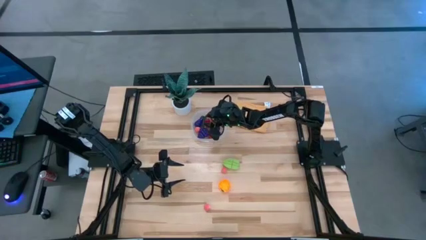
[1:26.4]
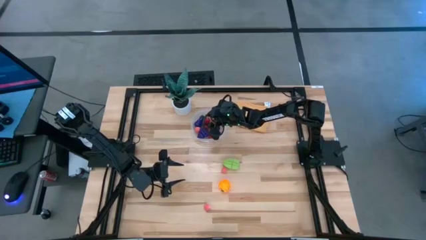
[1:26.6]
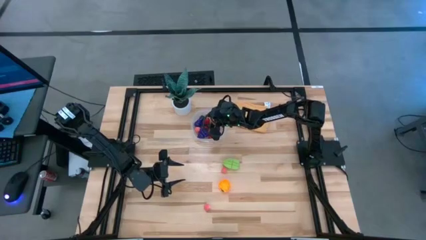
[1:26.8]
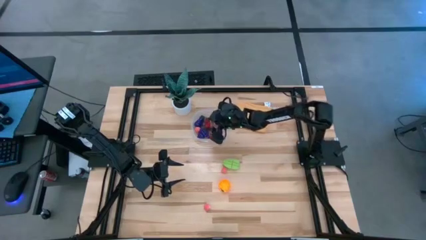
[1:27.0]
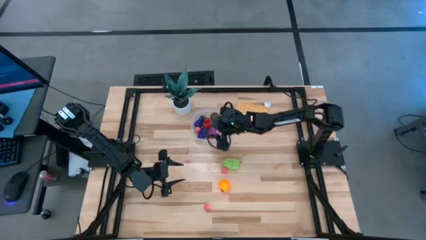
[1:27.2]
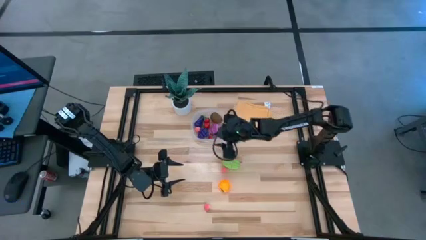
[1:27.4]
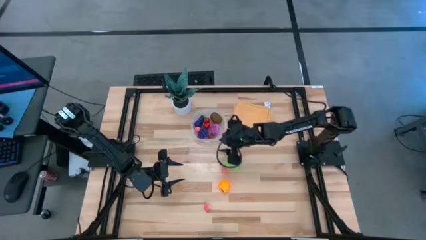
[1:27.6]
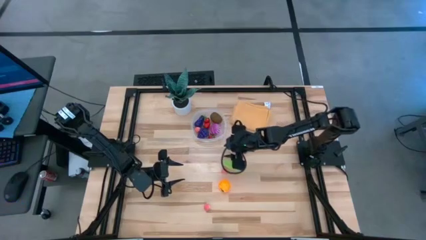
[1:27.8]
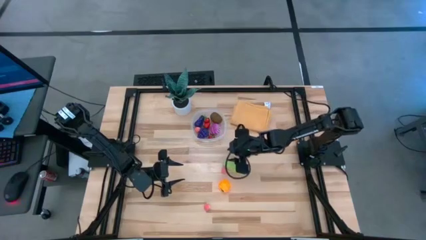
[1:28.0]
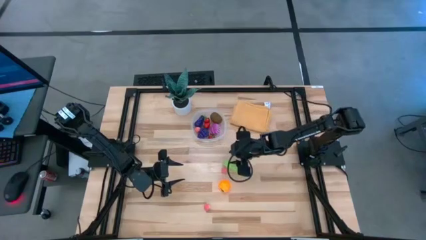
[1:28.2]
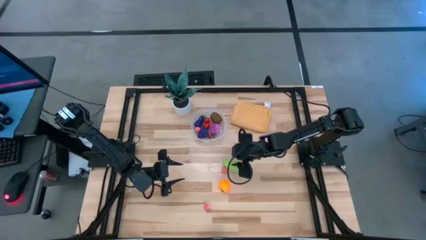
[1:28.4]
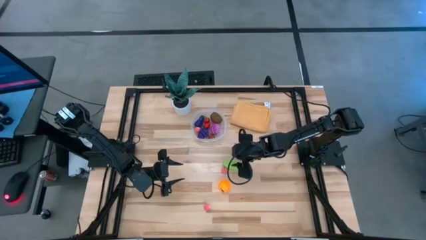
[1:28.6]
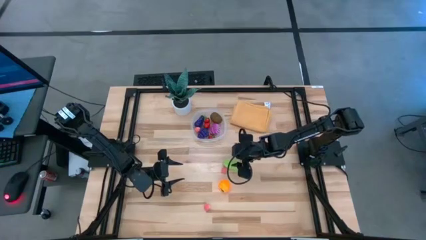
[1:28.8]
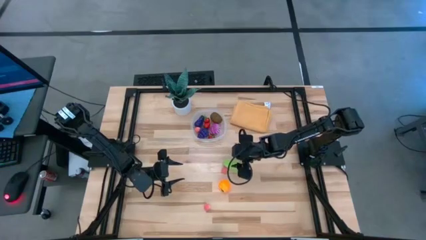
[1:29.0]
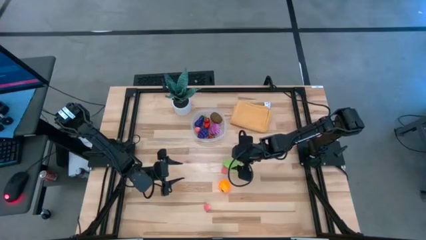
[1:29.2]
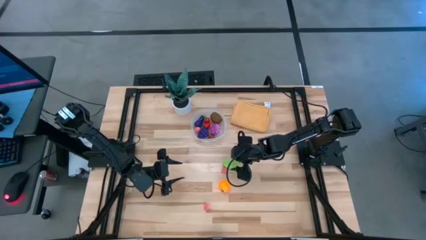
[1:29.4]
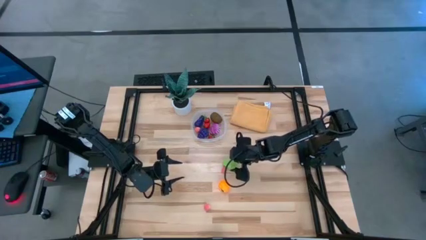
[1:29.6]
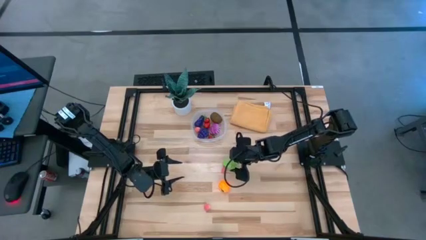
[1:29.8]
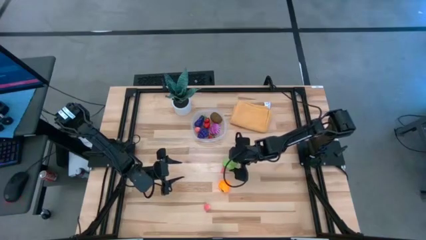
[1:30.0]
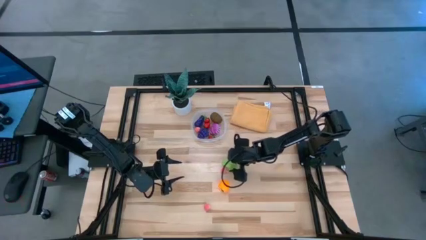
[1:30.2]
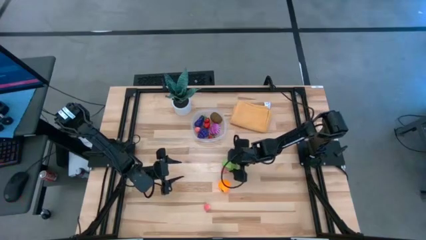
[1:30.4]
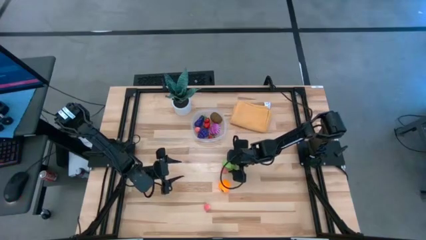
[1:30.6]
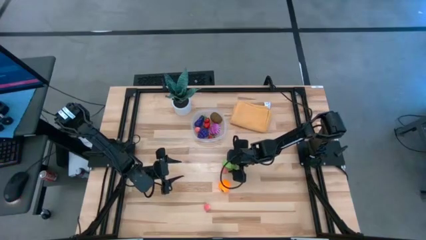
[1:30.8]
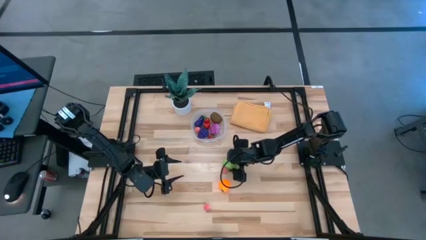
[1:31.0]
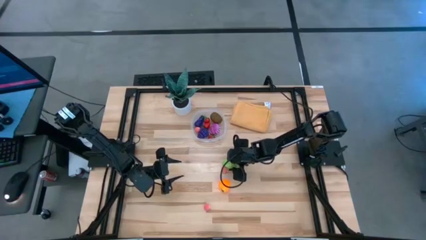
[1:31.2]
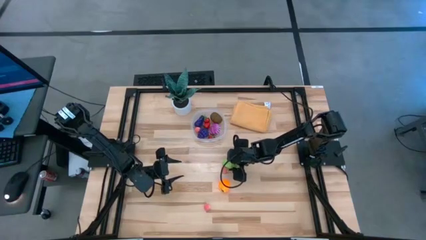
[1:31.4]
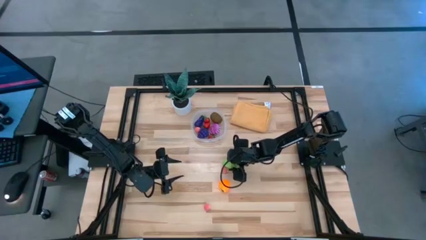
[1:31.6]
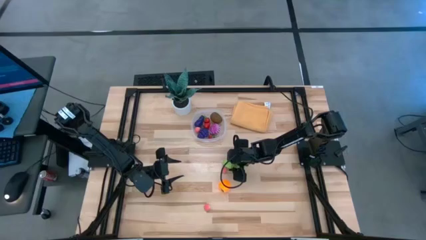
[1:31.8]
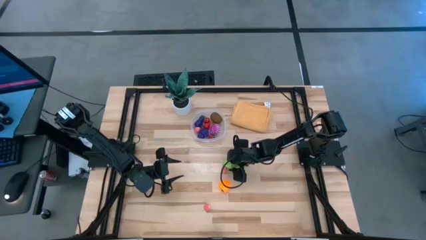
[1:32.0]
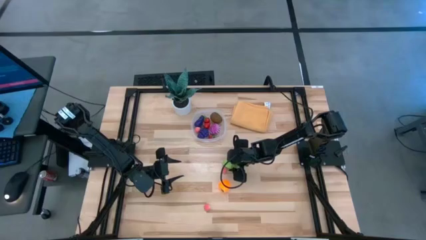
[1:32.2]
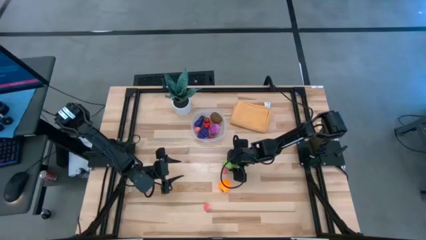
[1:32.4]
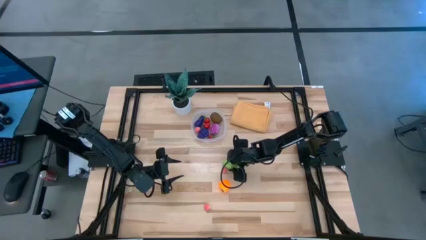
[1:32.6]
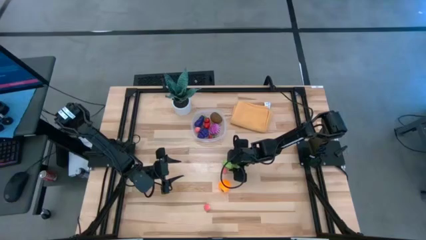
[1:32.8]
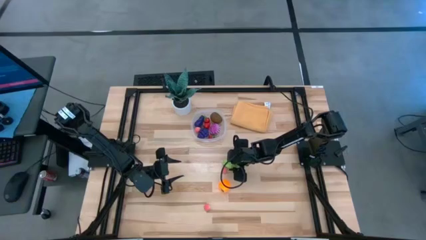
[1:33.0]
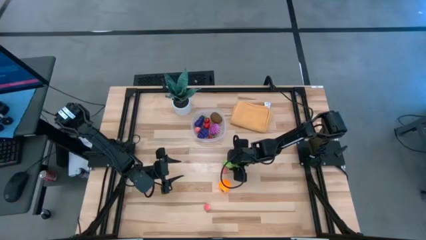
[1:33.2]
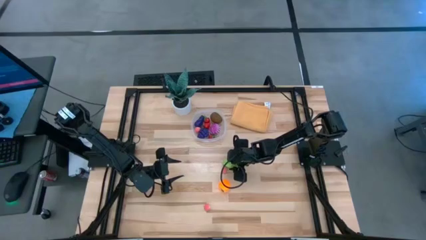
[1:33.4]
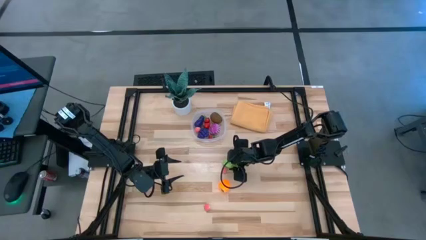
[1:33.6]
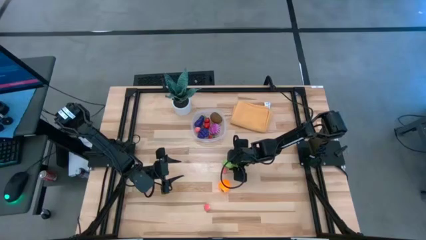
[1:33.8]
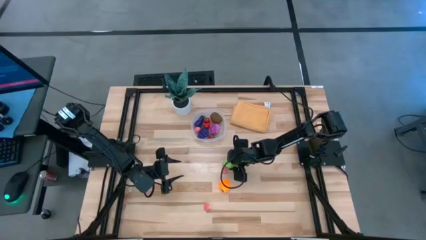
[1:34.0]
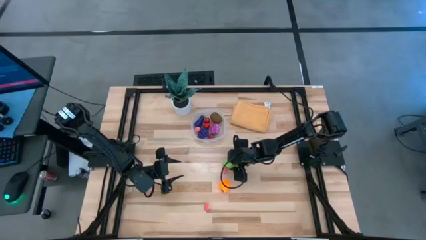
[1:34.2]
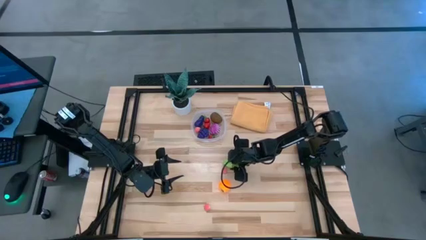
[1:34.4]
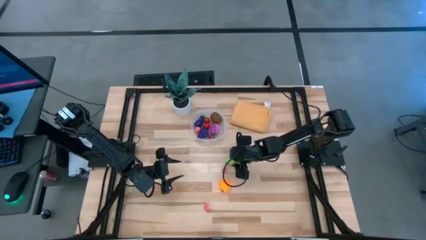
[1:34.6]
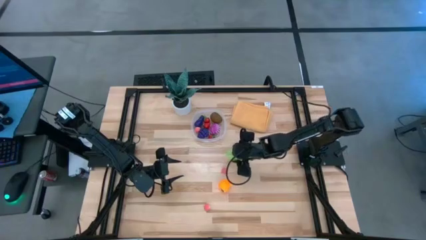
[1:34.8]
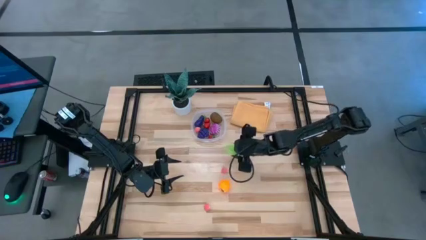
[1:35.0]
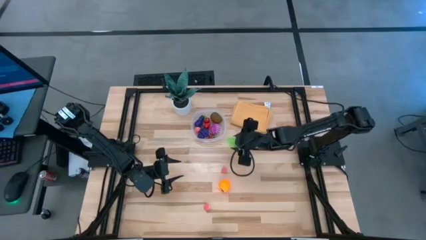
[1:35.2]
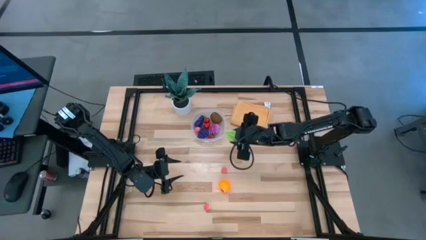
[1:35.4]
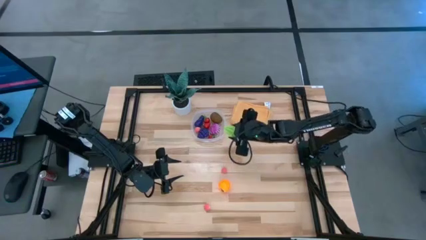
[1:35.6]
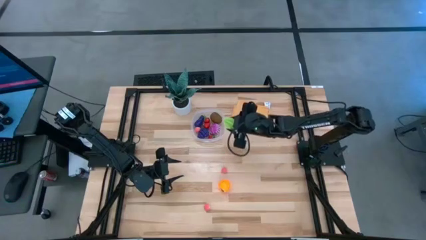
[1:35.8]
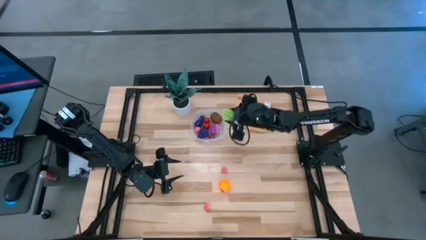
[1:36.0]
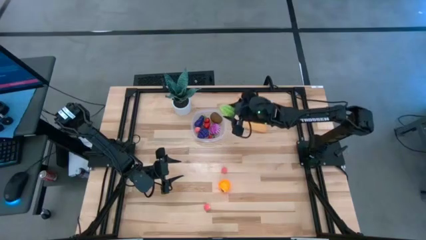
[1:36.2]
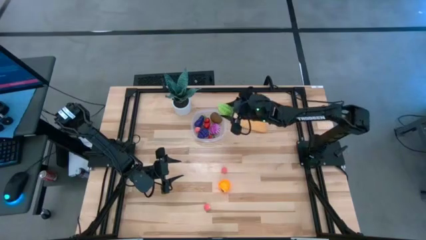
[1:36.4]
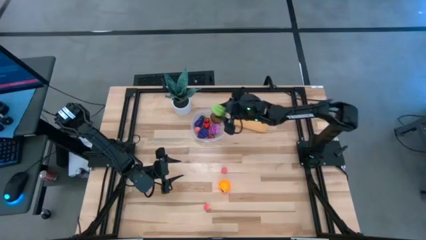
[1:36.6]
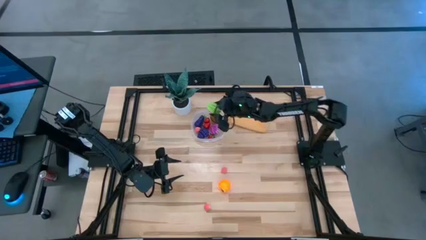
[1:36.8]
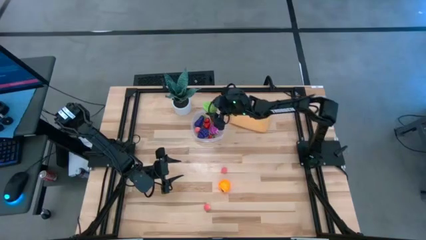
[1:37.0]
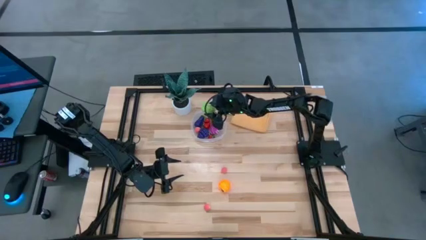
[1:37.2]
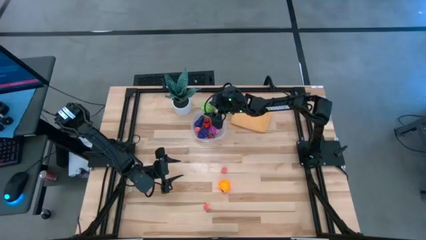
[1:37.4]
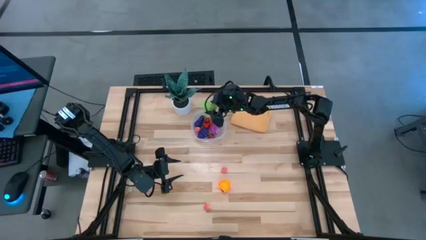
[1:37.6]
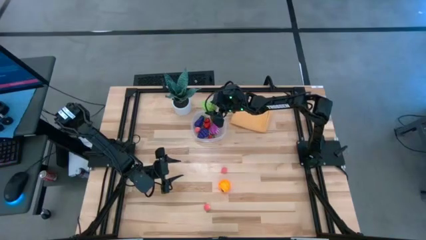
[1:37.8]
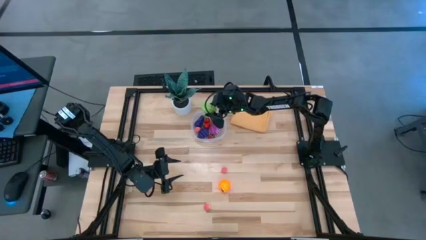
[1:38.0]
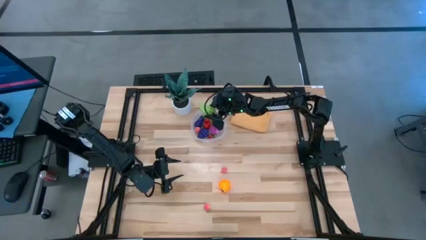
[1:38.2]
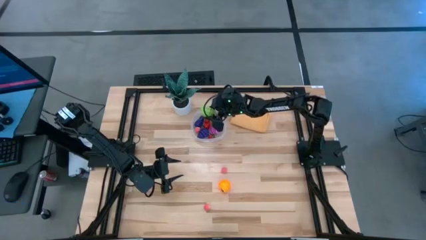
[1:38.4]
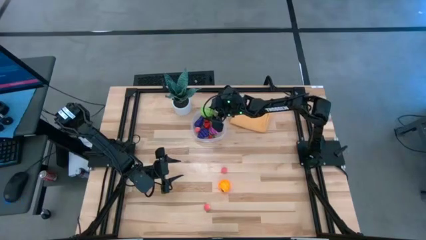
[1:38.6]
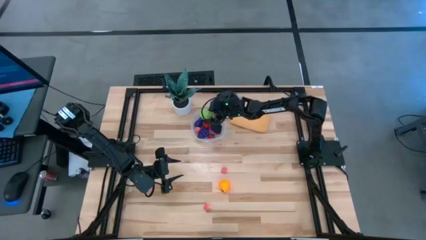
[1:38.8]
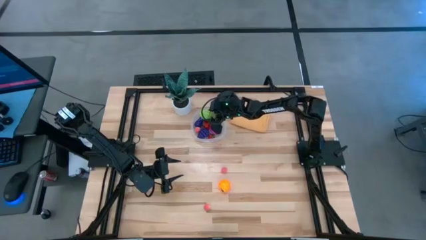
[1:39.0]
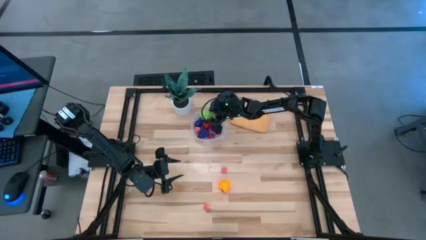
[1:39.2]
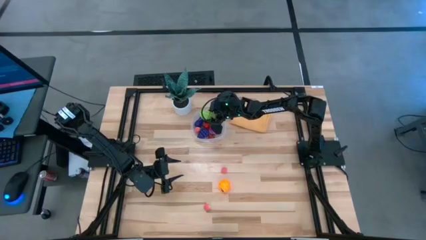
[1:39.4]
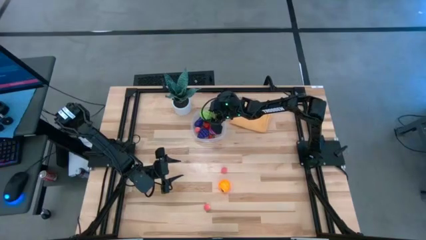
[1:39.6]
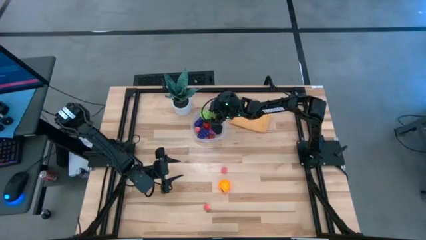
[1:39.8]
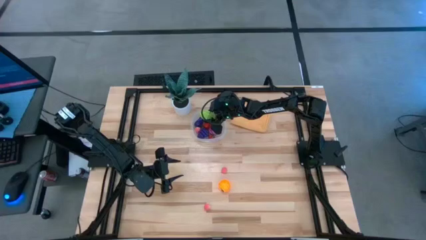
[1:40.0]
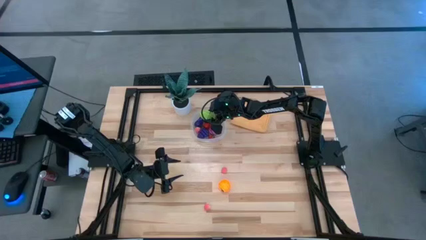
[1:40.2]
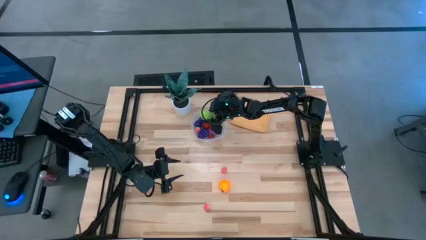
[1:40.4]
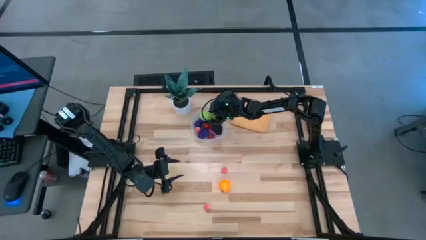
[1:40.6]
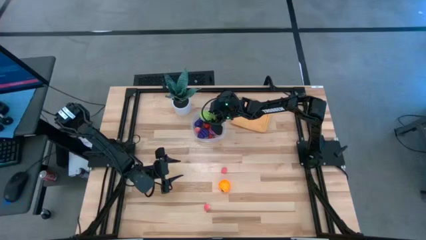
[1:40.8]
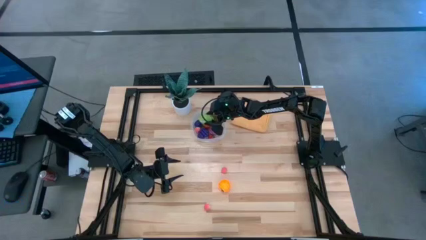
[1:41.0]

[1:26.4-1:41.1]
Task: Pick and placing Produce into tupperware
Put the green starfruit into the transparent bin
